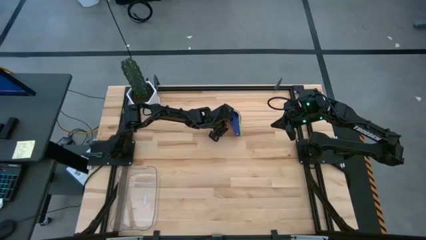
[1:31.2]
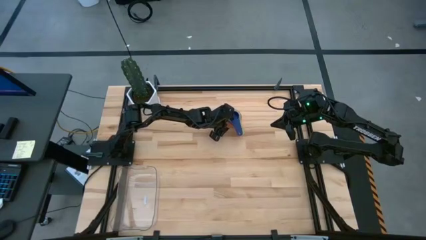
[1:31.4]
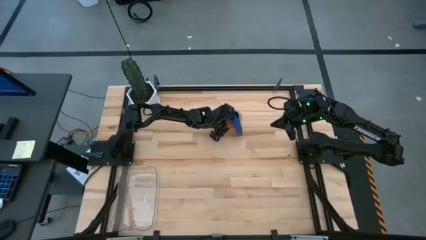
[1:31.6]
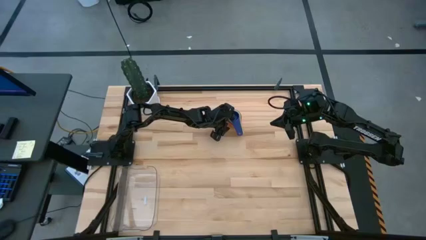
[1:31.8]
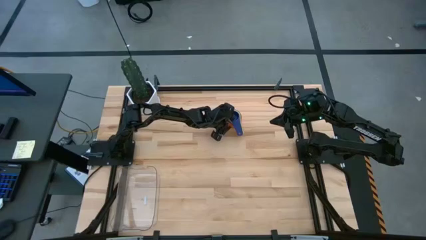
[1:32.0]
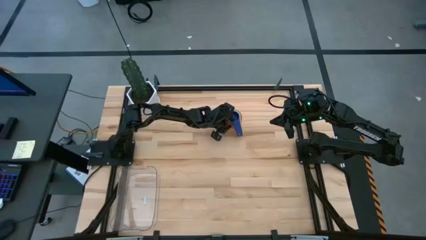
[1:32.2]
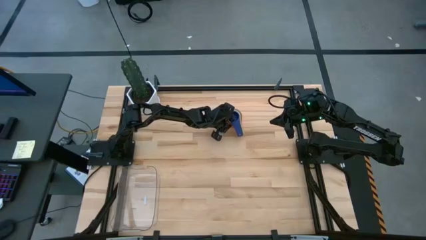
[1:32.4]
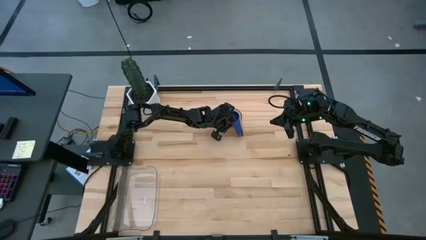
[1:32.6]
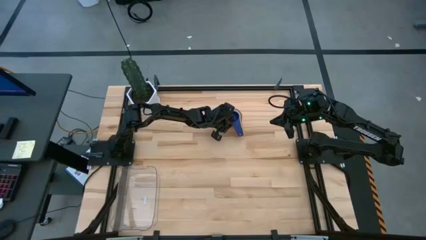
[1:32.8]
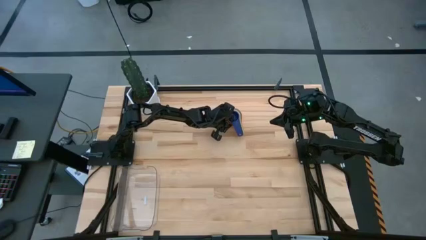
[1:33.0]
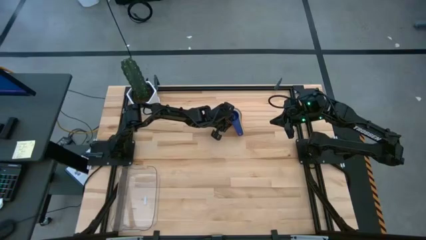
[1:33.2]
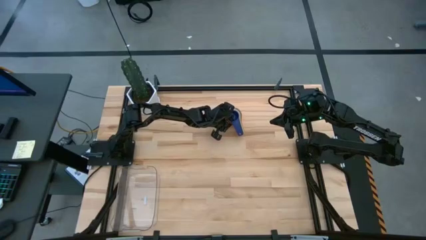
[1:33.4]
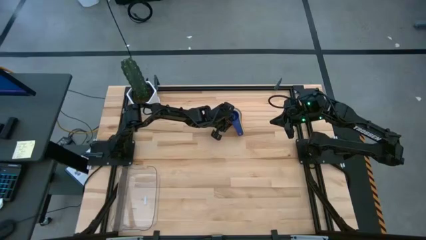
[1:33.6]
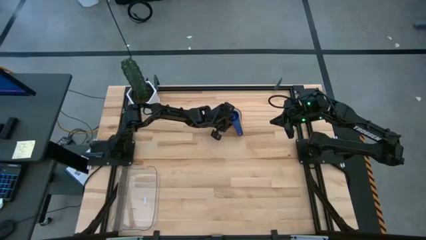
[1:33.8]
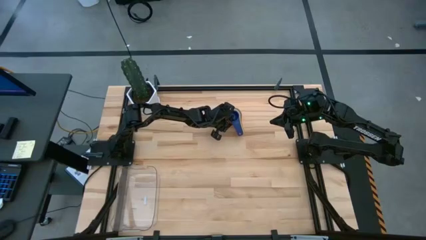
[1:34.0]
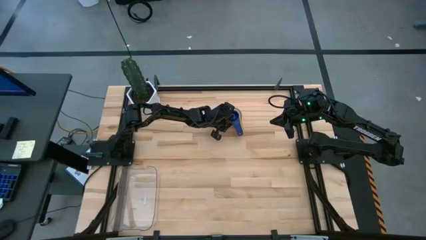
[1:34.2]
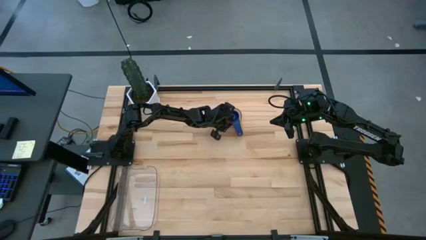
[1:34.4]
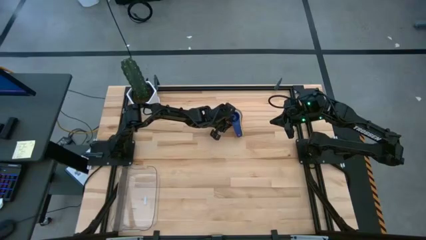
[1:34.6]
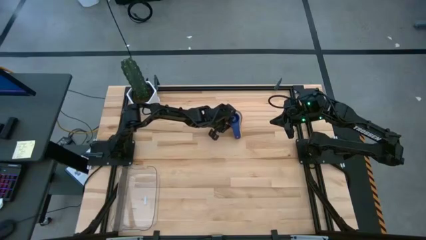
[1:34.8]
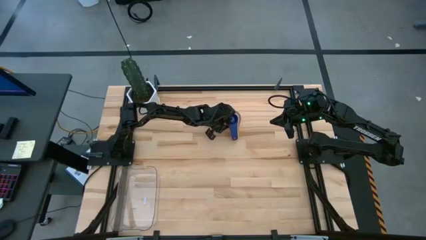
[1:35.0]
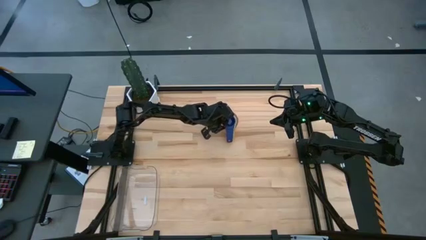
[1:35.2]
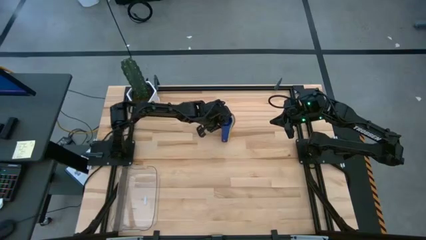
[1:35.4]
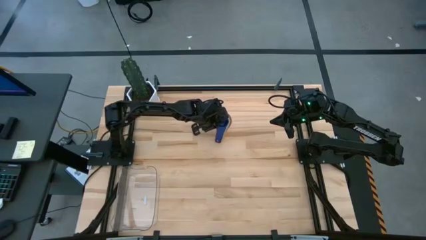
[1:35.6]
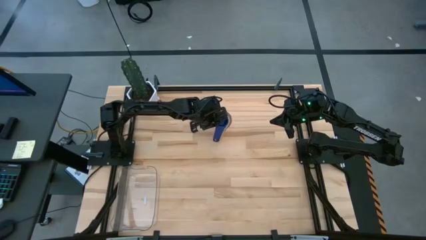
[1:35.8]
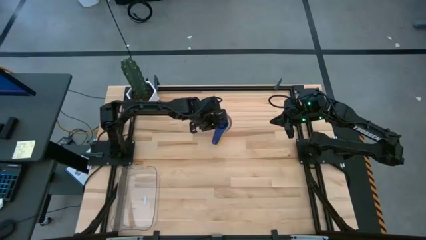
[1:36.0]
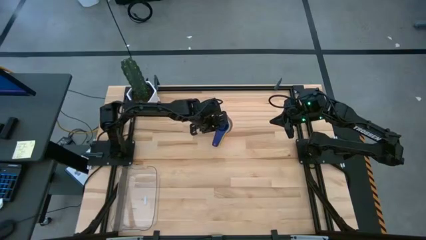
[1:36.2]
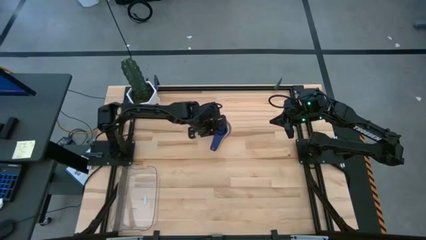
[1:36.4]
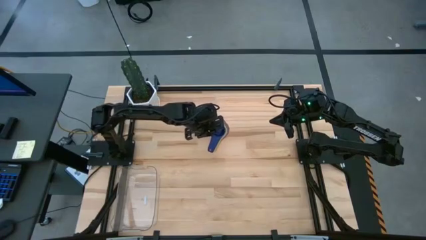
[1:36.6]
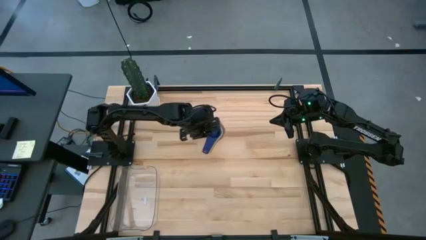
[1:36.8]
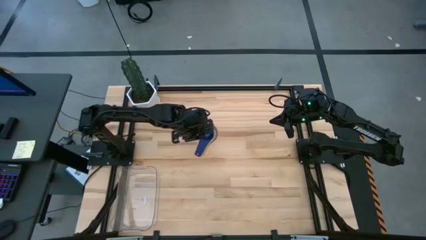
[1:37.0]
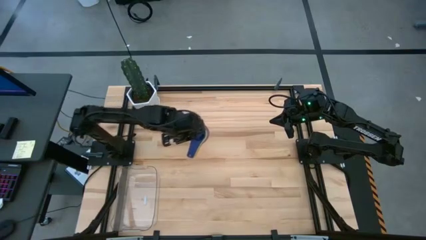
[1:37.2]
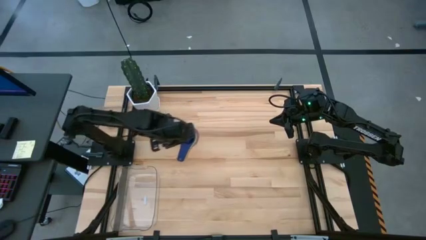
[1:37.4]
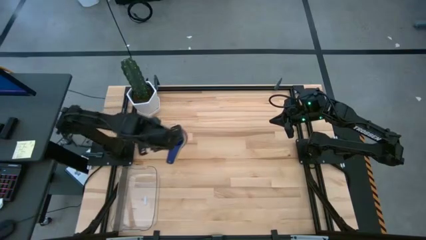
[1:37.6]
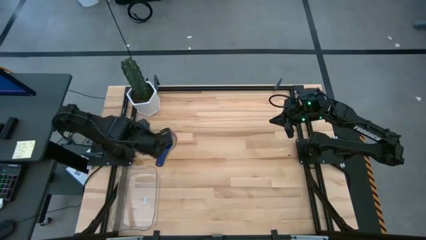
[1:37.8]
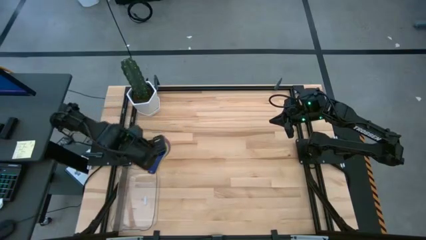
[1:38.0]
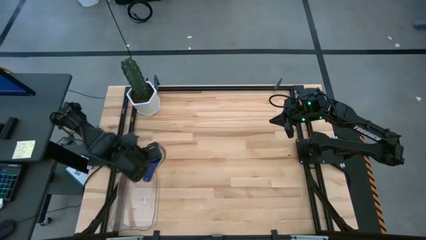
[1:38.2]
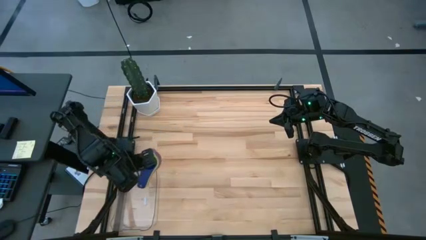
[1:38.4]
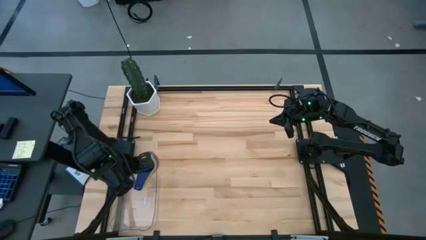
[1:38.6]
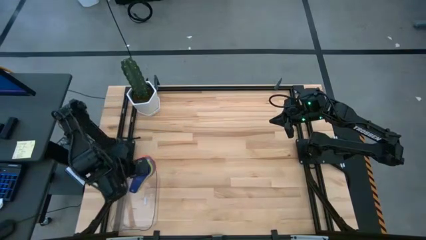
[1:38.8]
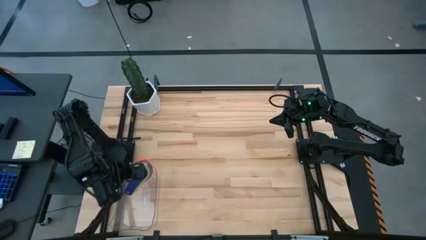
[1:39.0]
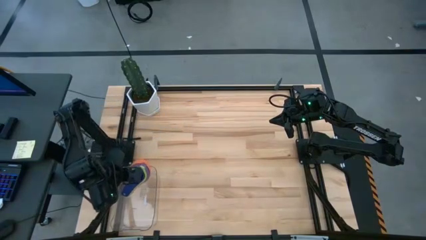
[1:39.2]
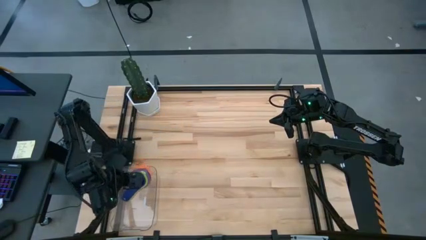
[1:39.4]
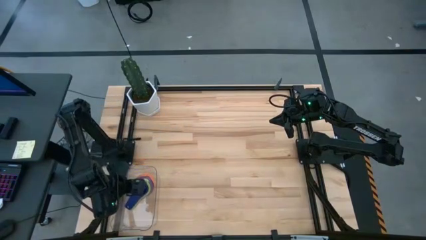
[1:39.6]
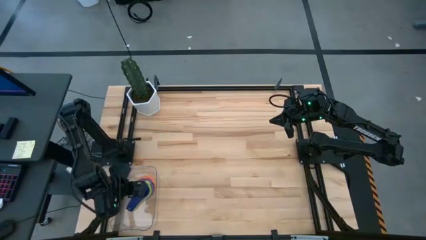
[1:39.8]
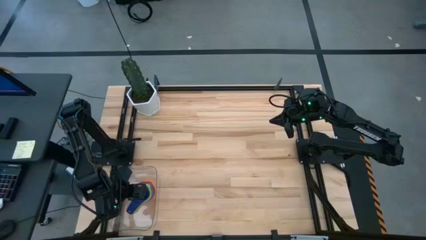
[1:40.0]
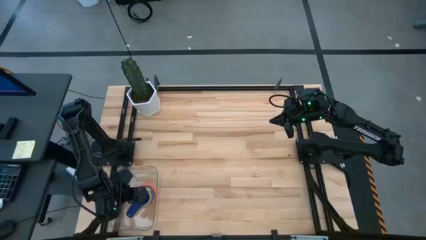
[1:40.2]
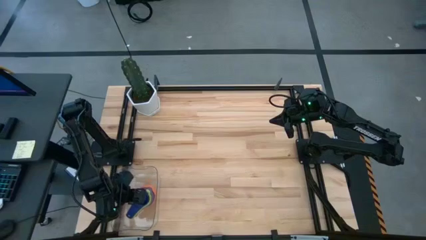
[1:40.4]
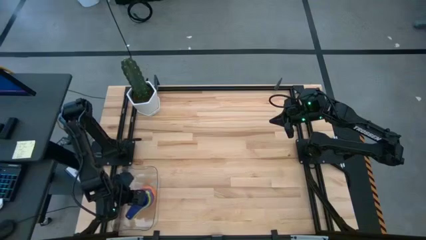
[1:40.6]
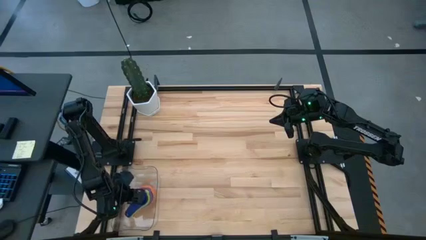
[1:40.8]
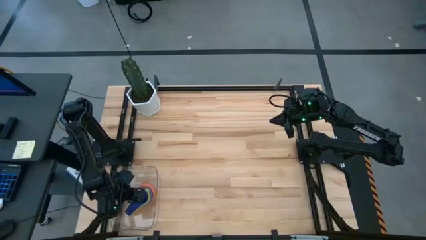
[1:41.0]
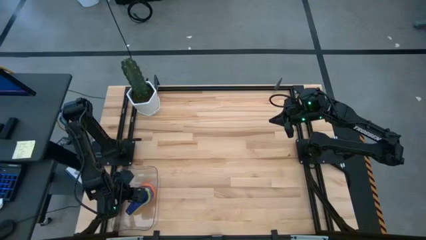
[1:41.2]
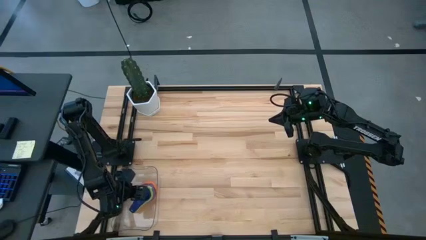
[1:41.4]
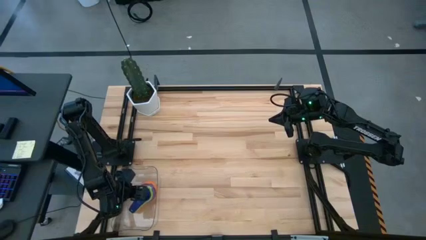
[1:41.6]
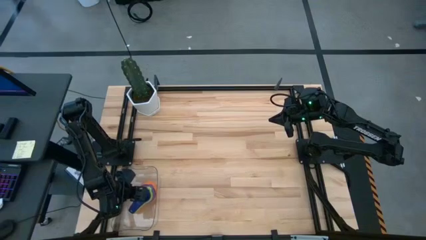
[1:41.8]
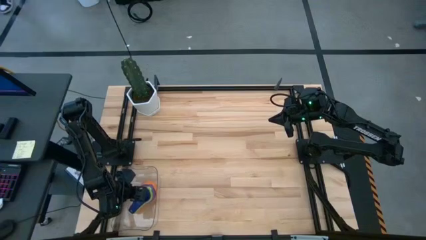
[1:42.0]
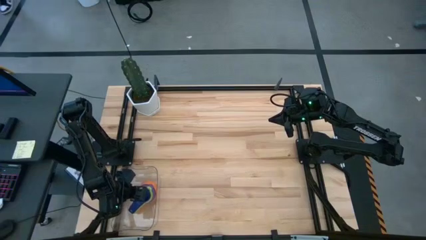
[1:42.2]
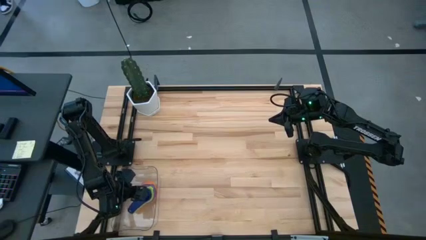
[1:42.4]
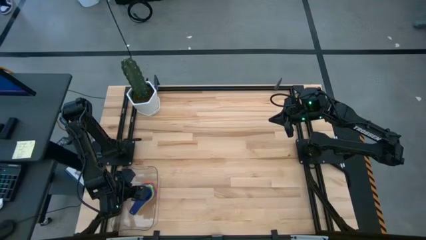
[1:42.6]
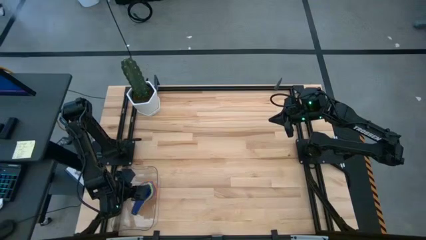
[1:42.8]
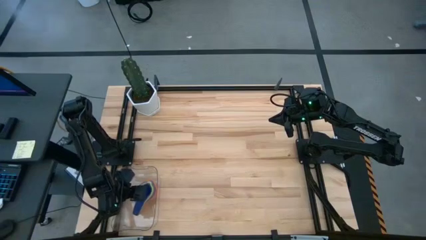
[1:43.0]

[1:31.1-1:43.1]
Task: Nest measuring cups in basket
Put the stacked colored measuring cups into the transparent bin
